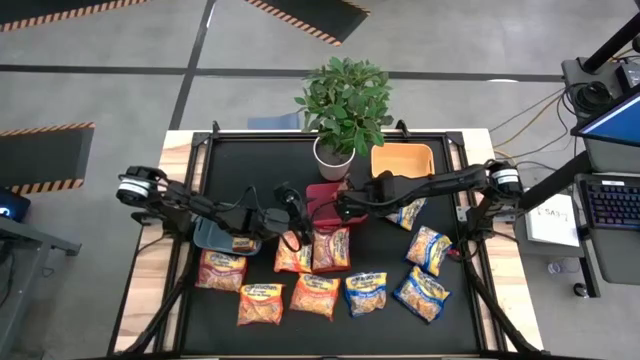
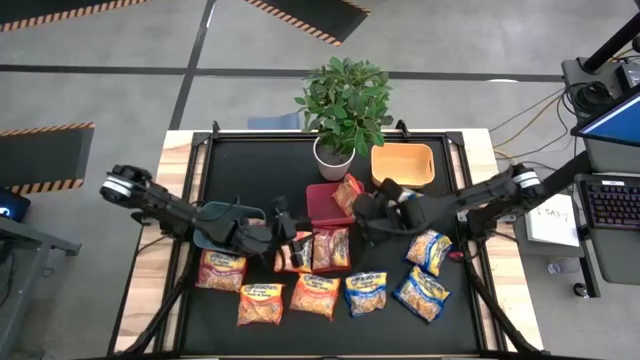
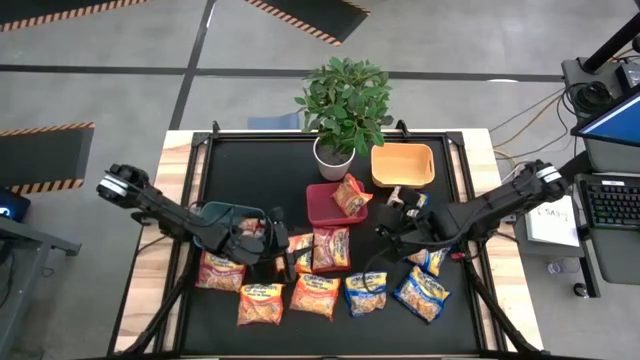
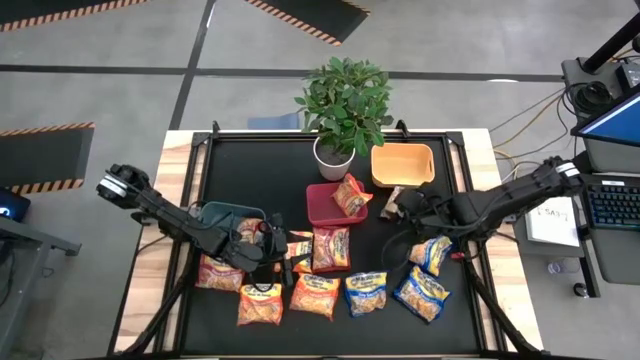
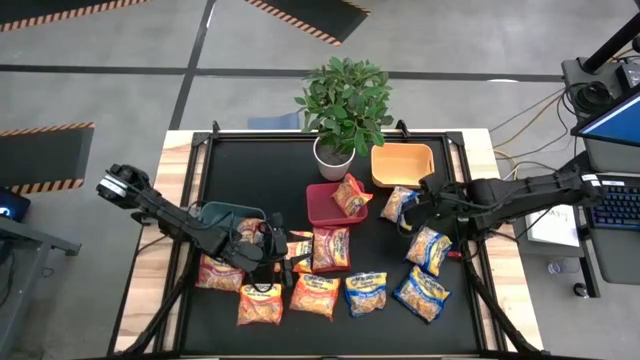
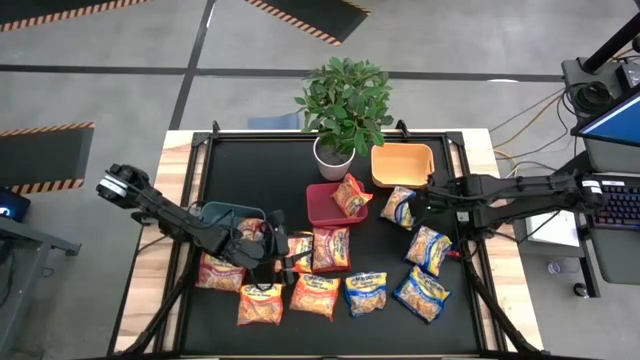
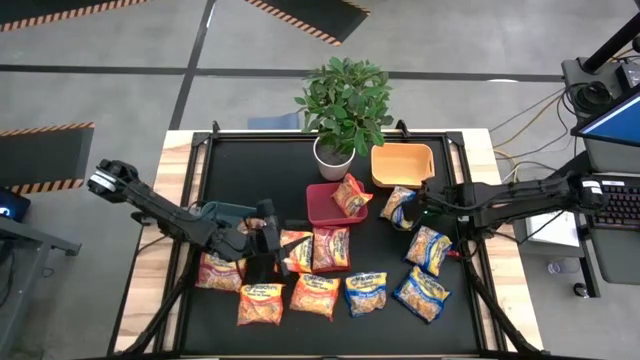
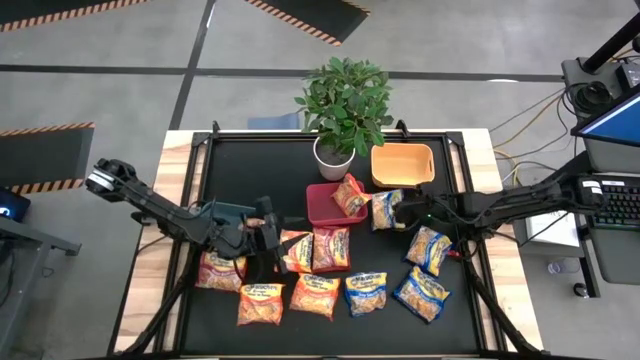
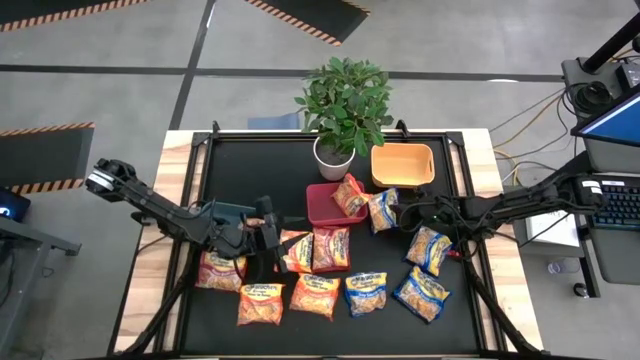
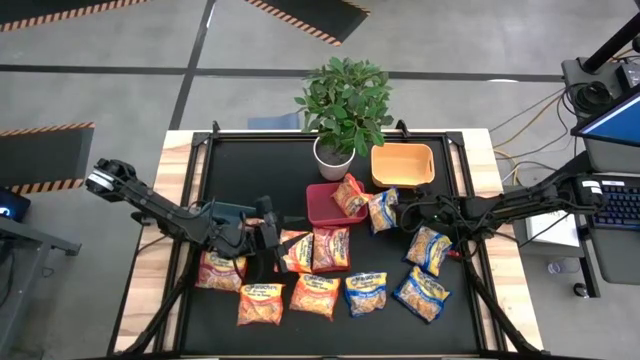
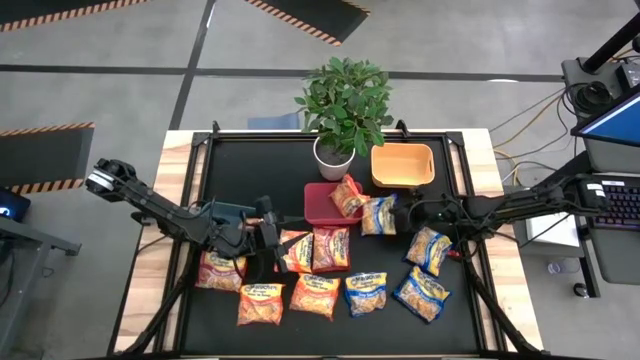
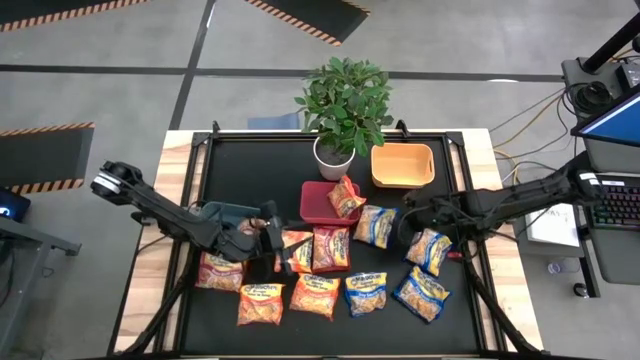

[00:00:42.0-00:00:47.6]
Task: Sort Maruchan noodles
Put the top left blue noodle pack into the yellow bin

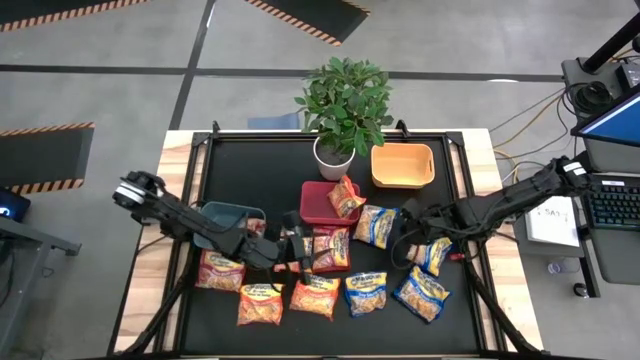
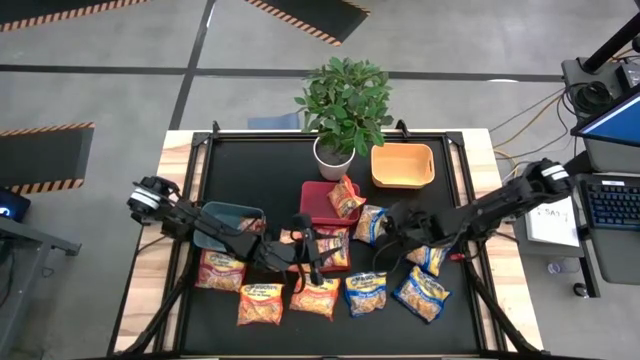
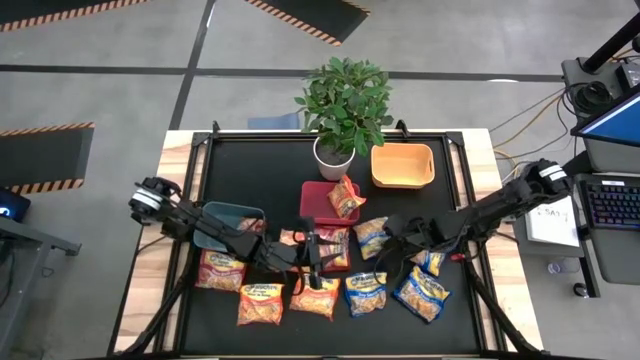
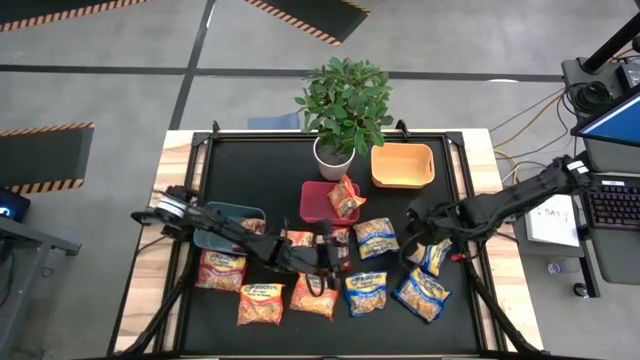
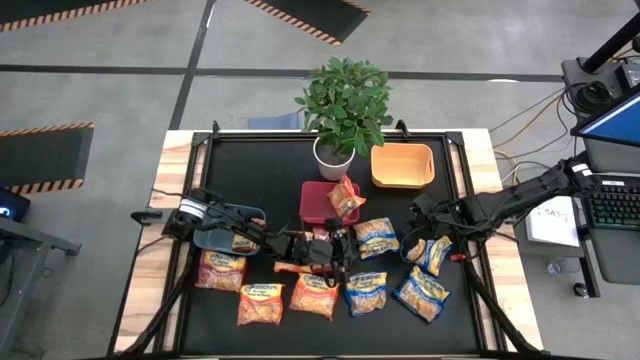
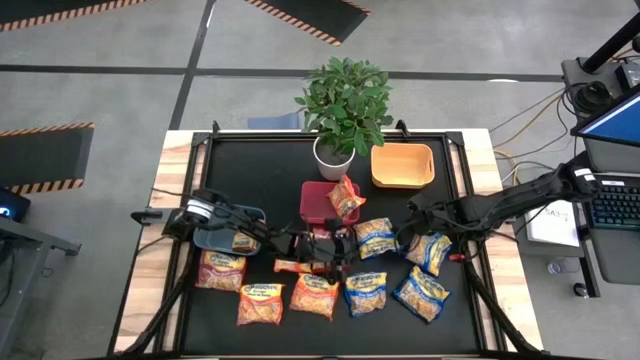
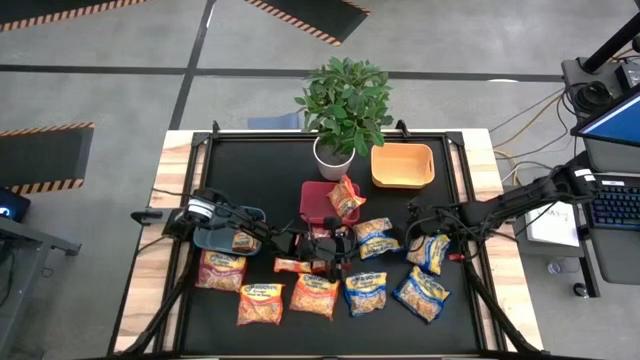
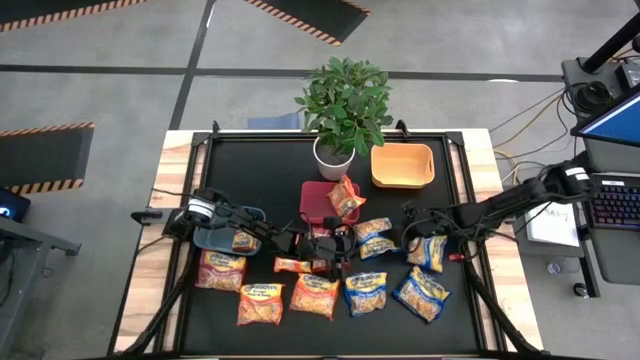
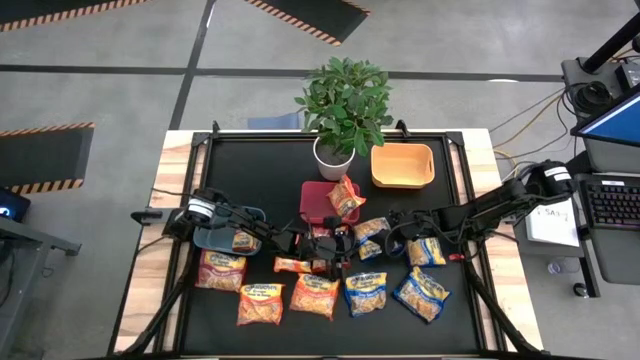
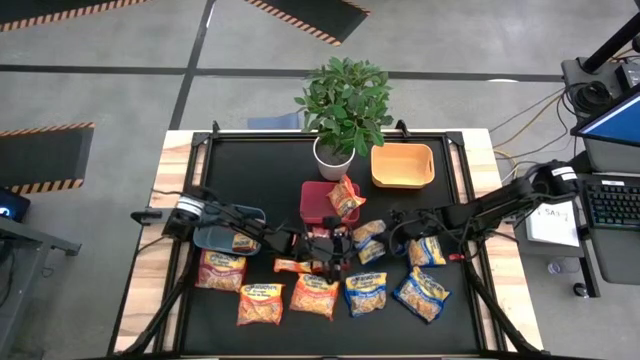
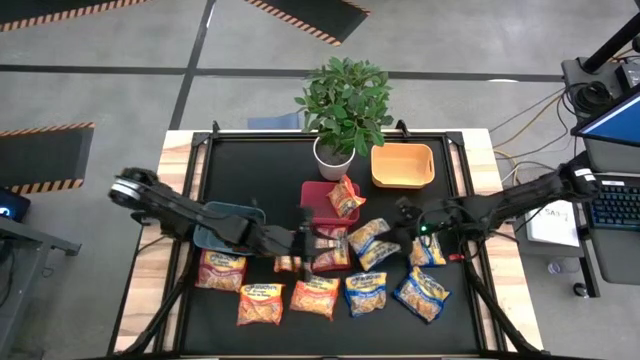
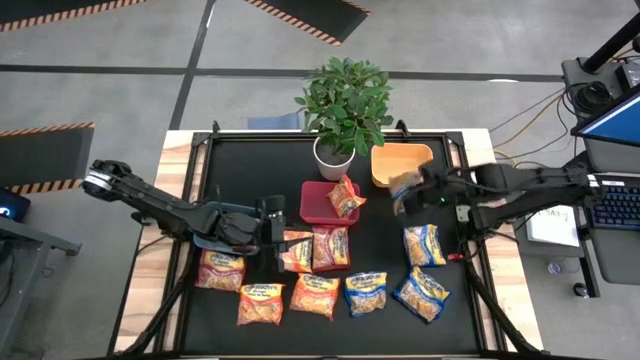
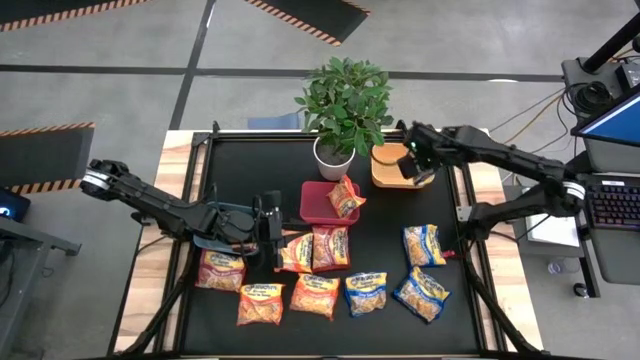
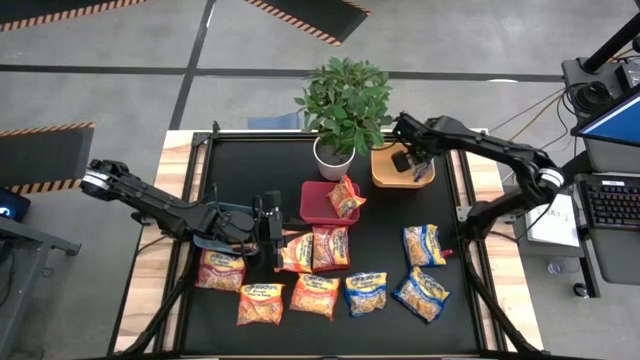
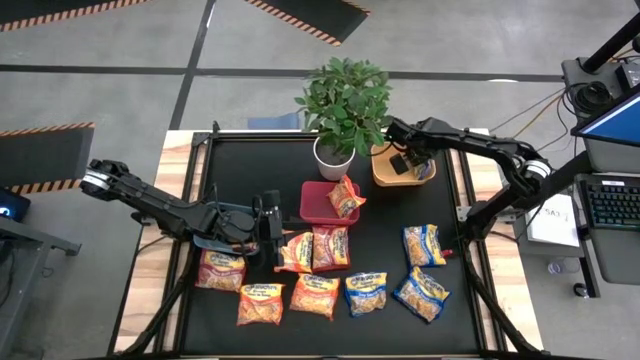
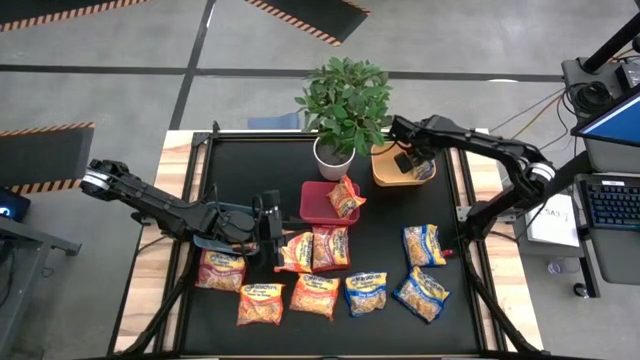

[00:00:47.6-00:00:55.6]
Put the top left blue noodle pack into the yellow bin

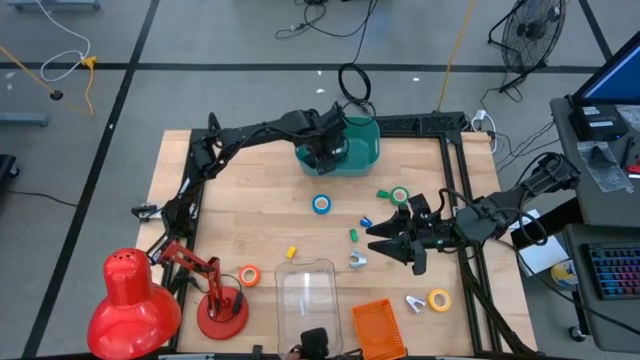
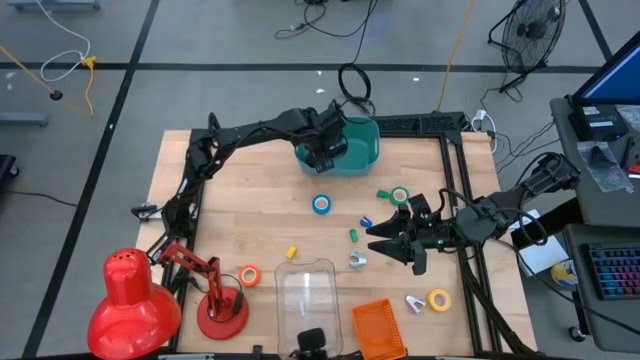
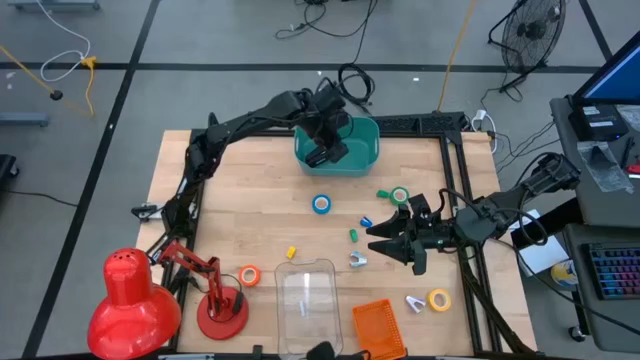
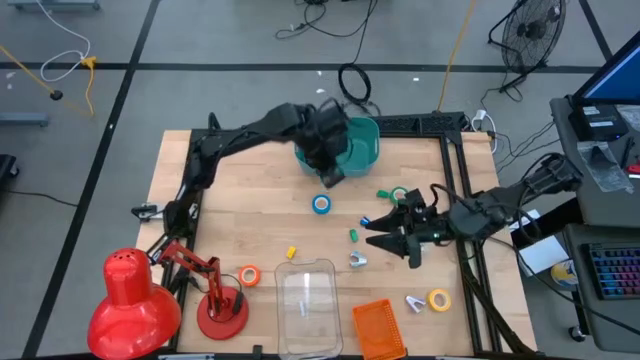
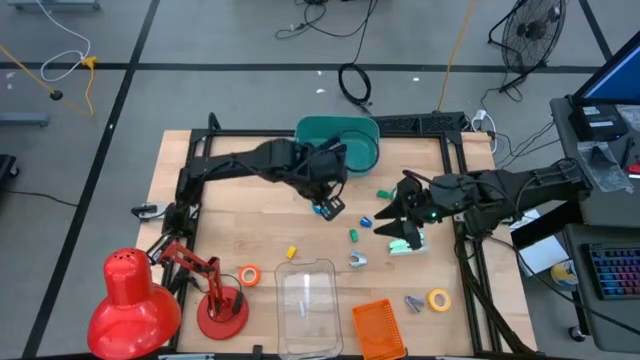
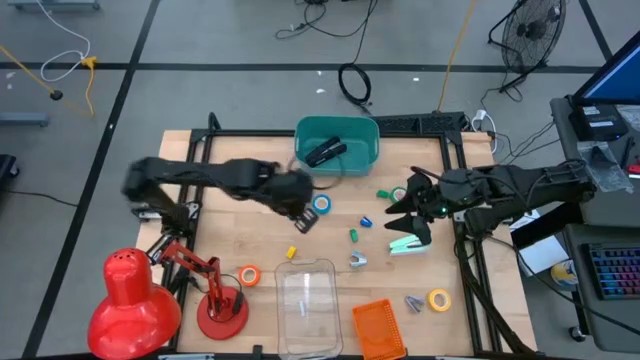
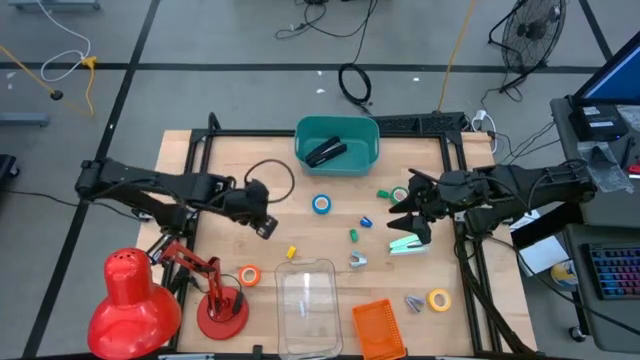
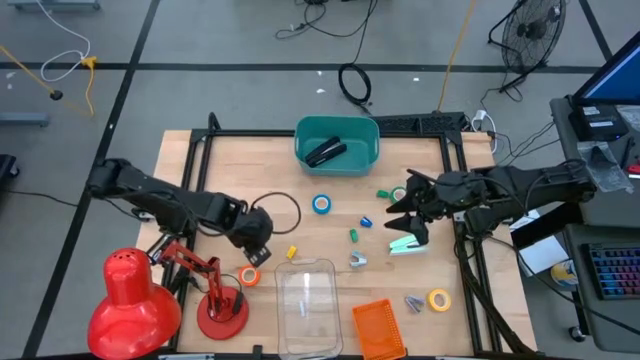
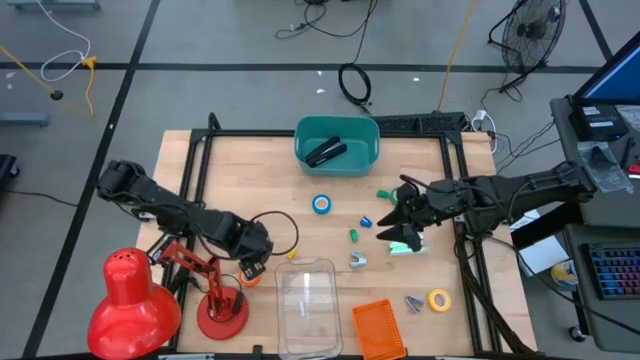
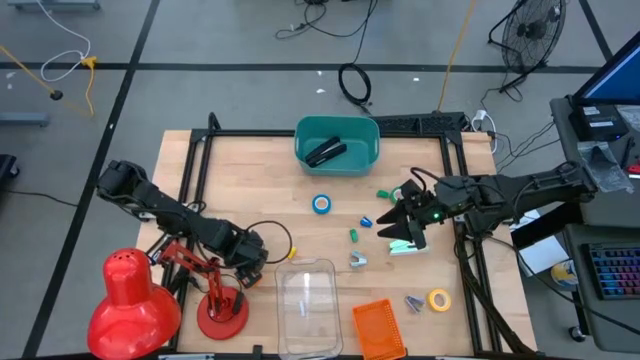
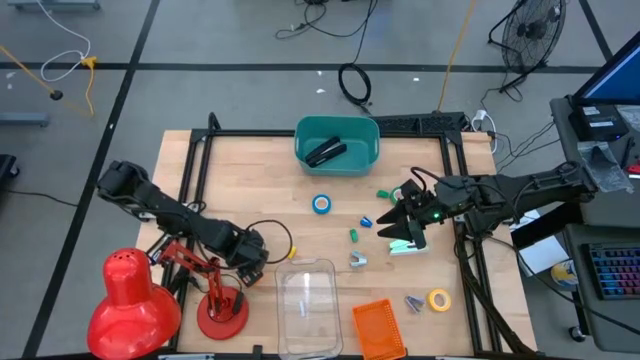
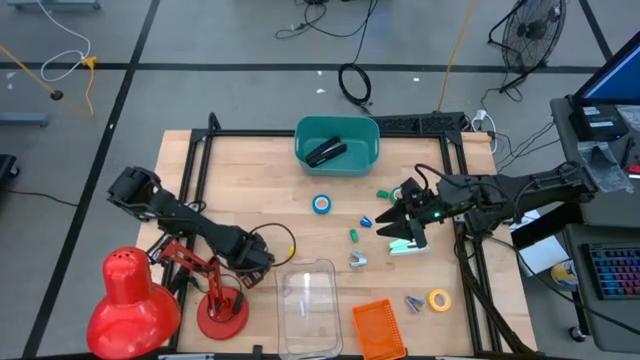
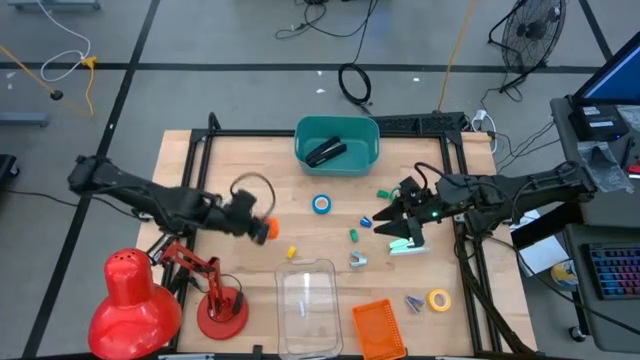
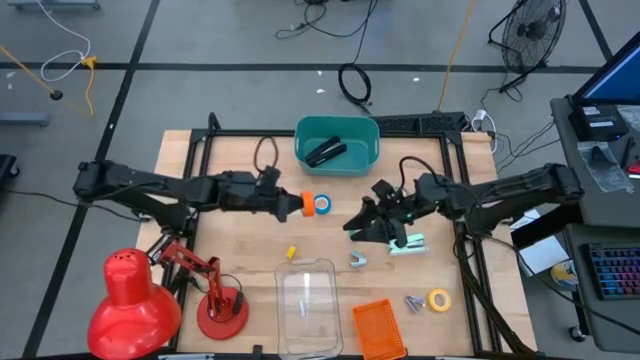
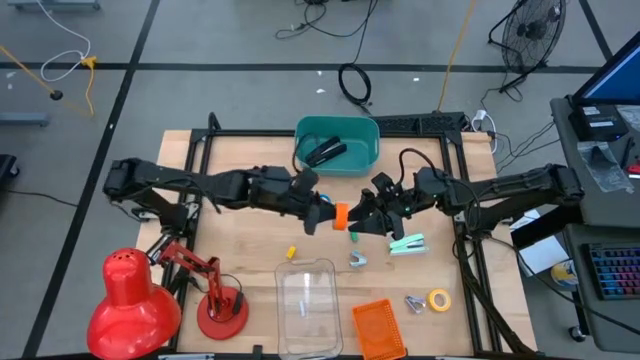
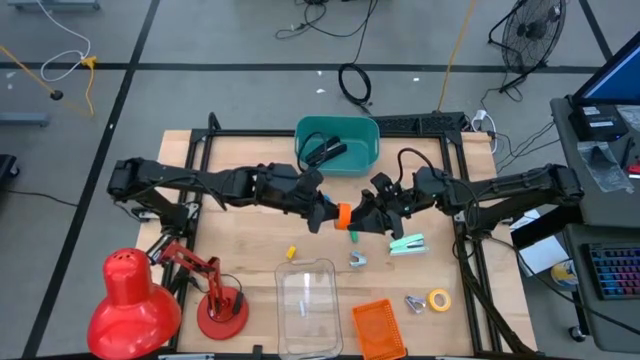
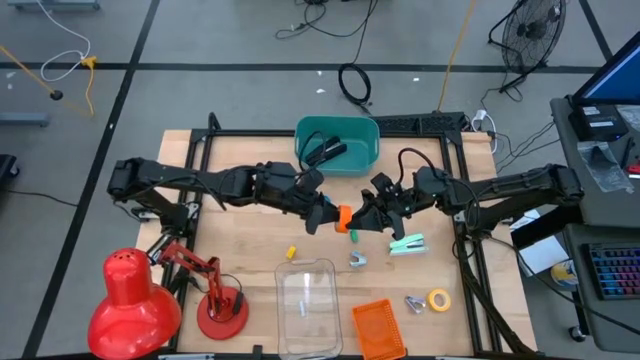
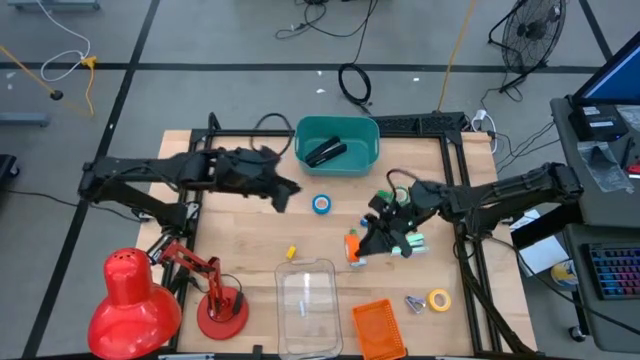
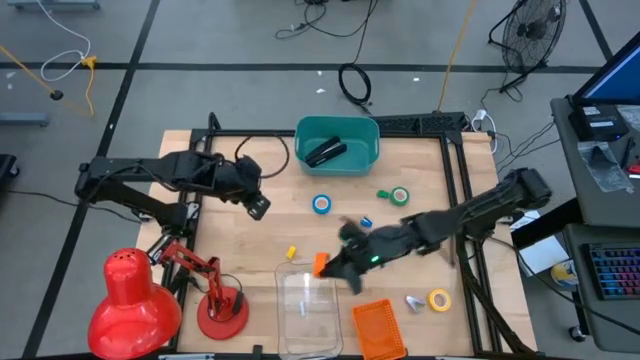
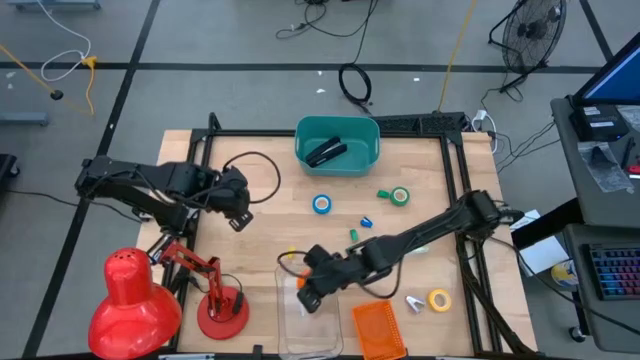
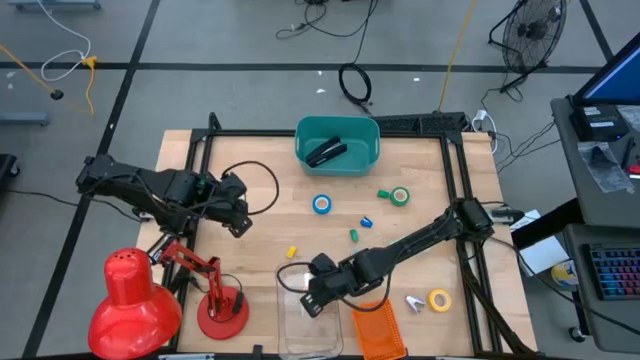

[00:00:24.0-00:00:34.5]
Task: Pick and place Stapler, Stapler remover, tape
Put the orange tape into the transparent bin
